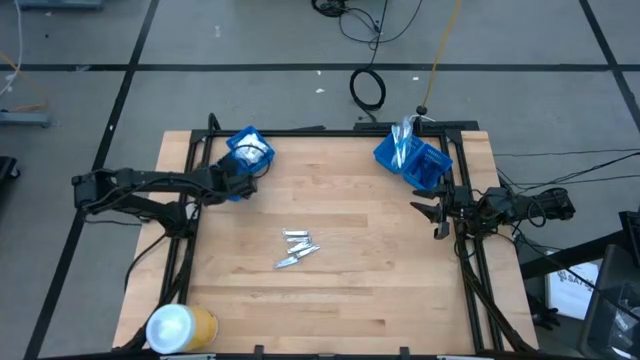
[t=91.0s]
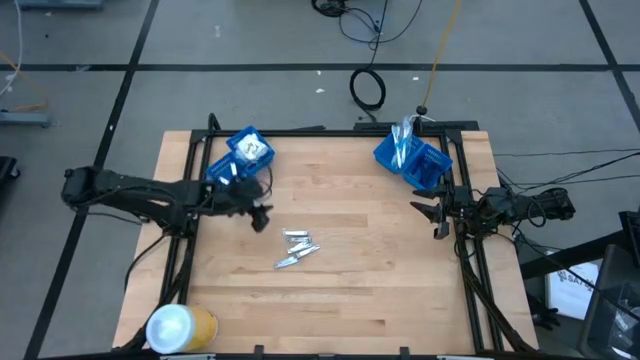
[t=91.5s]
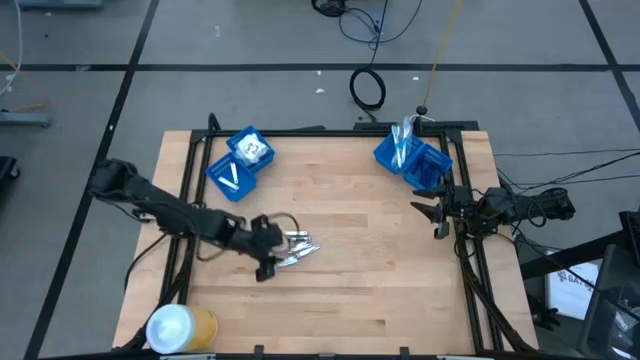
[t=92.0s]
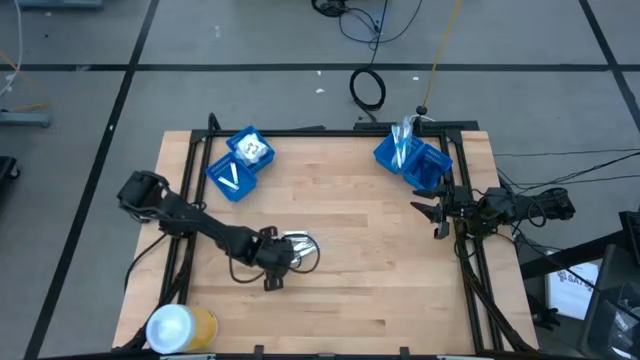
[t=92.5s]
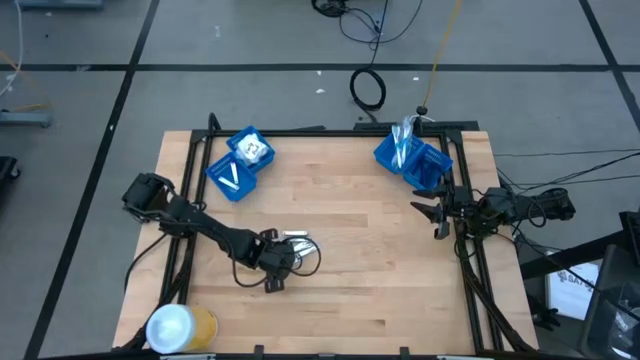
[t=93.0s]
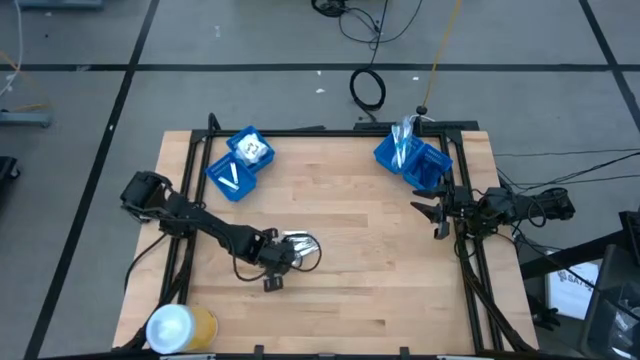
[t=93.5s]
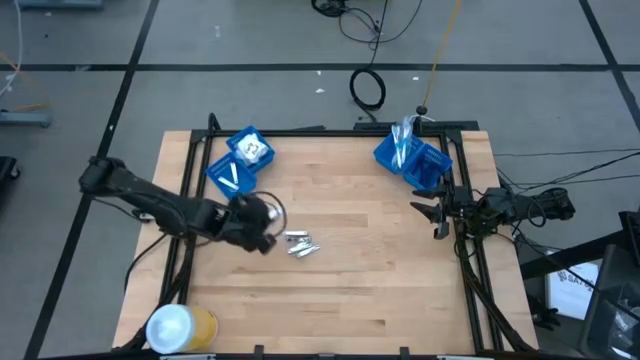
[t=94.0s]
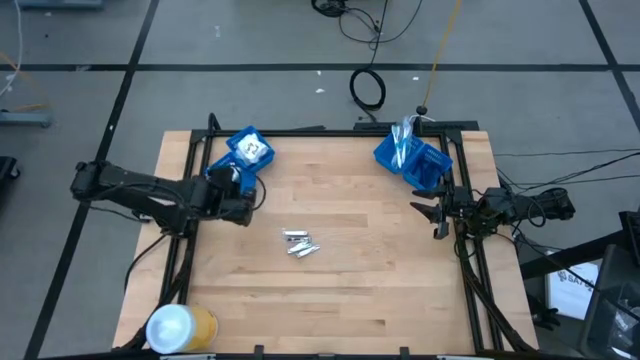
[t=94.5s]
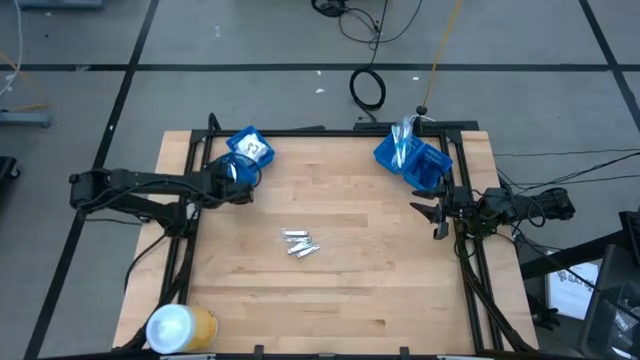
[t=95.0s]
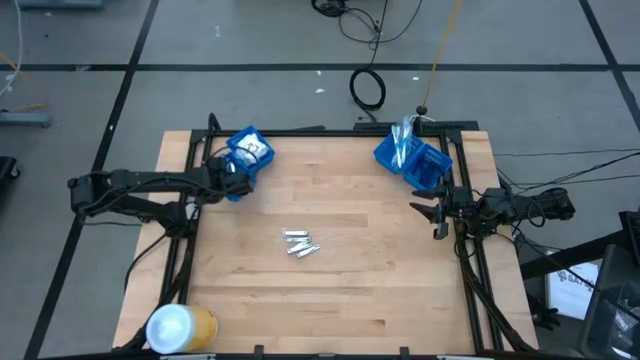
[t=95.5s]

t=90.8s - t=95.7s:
Task: Pick & Place Travel size toiletries
Put the silver nail cutter into the left blue basket

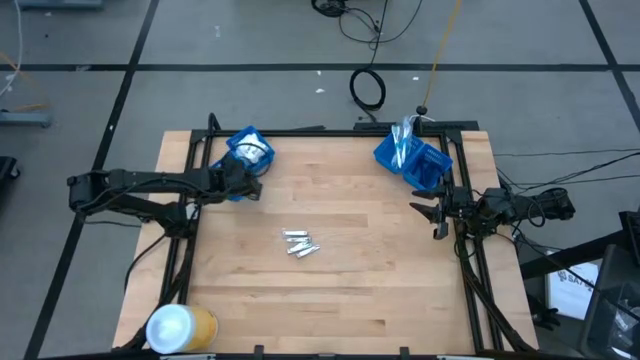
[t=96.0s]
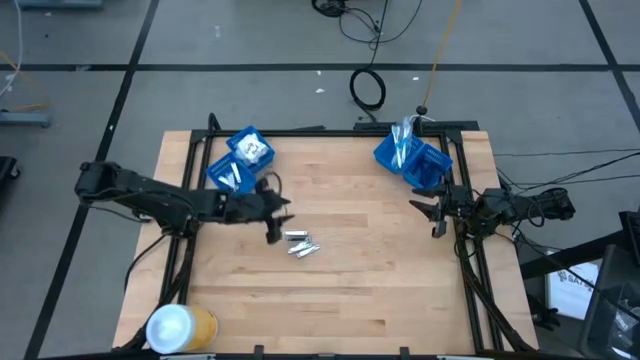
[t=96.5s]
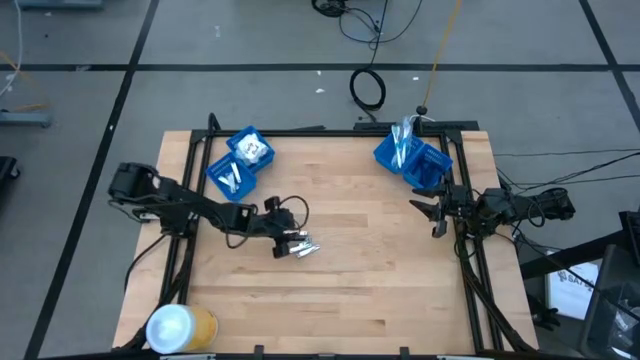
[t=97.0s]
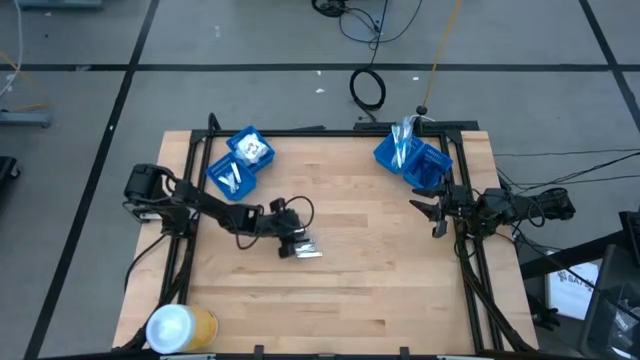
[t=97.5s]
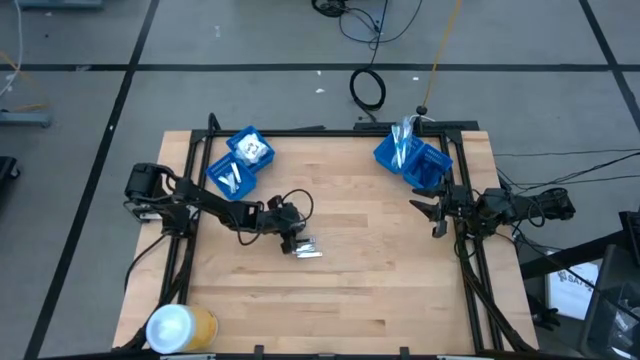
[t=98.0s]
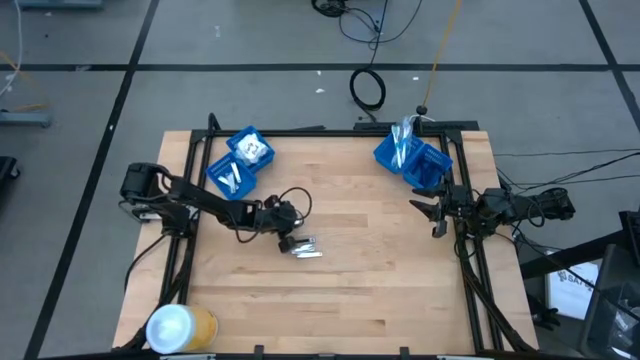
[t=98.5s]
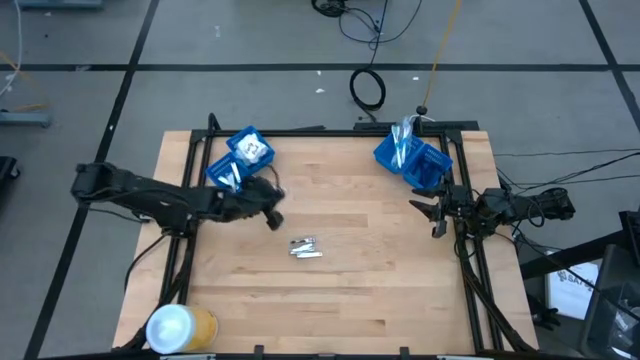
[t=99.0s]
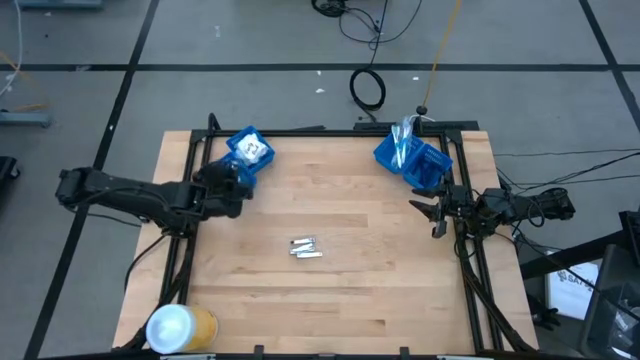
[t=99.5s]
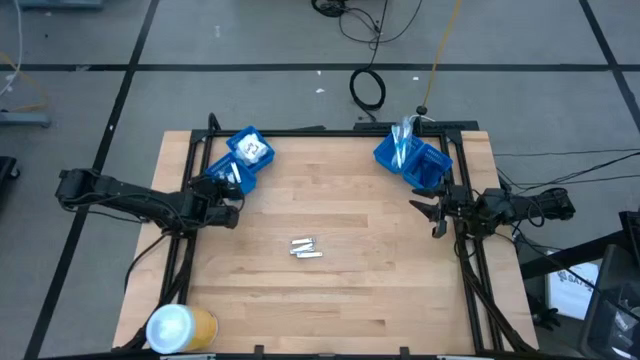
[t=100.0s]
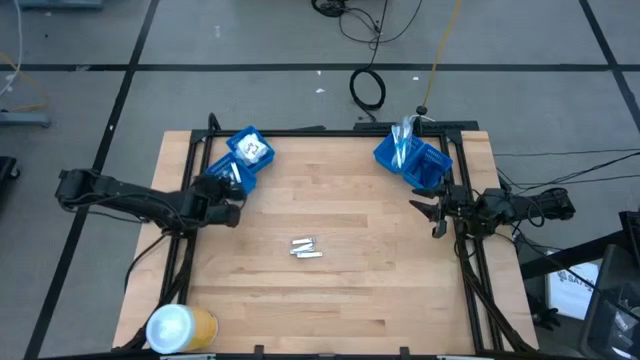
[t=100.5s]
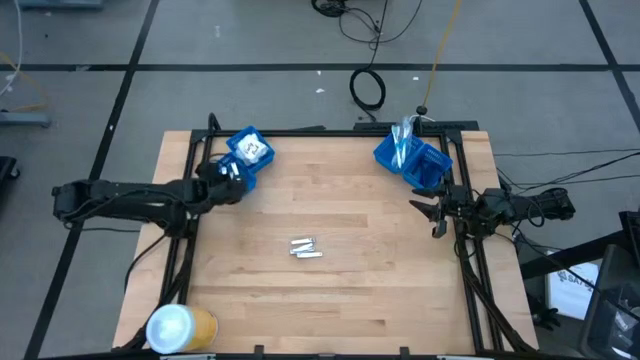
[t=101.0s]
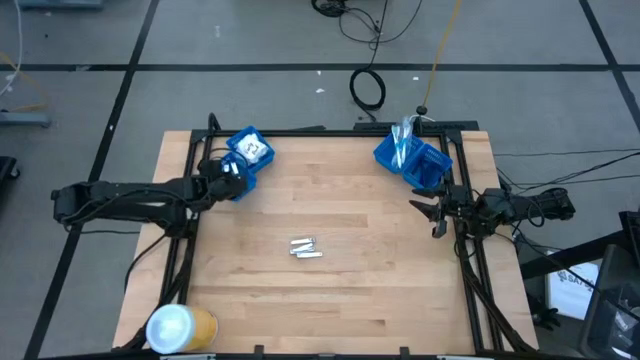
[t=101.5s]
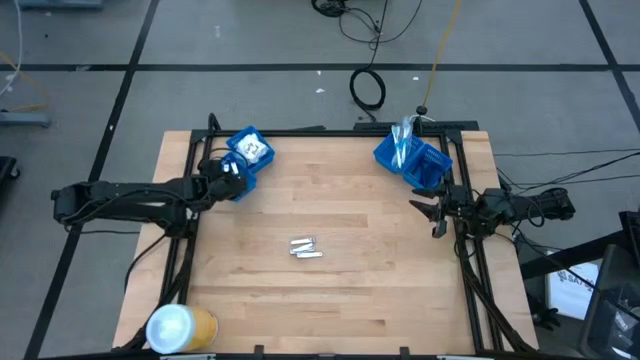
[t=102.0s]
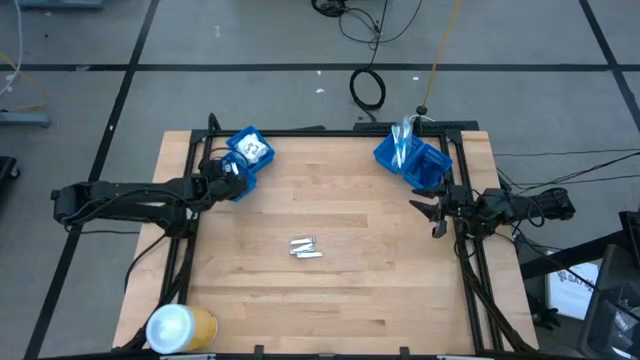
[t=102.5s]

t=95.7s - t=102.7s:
Put the silver nail cutter into the left blue basket

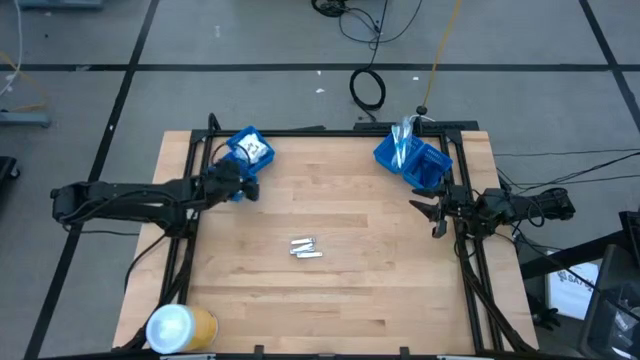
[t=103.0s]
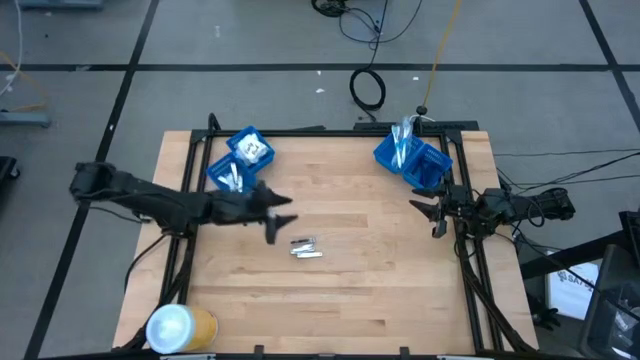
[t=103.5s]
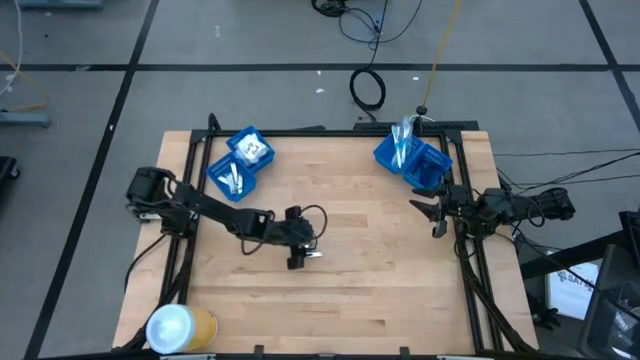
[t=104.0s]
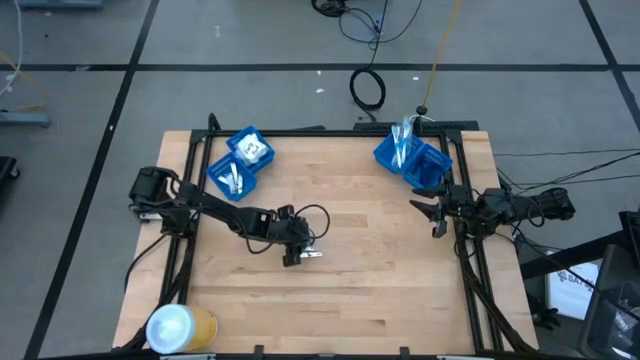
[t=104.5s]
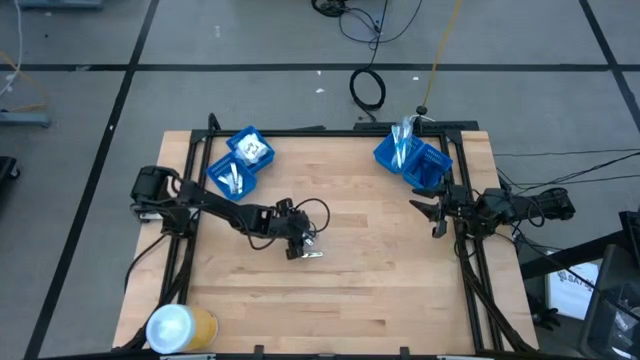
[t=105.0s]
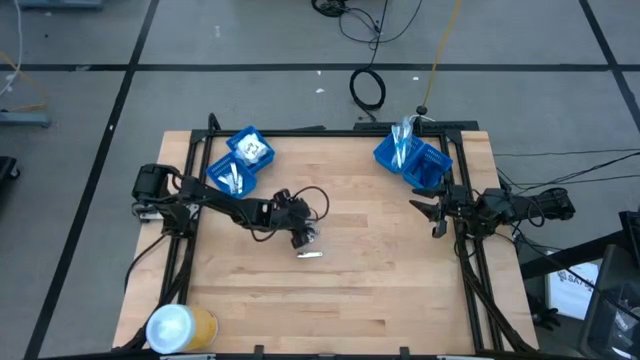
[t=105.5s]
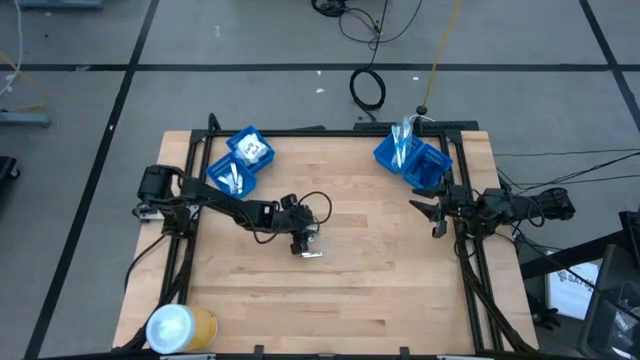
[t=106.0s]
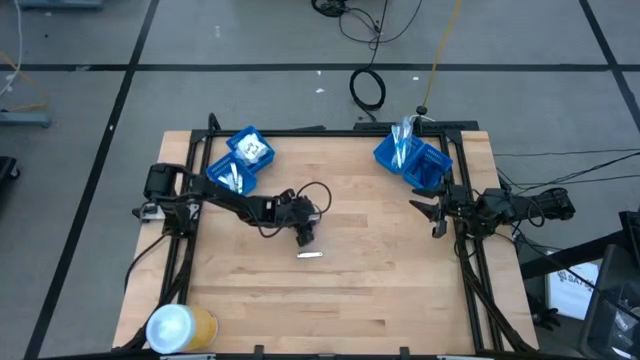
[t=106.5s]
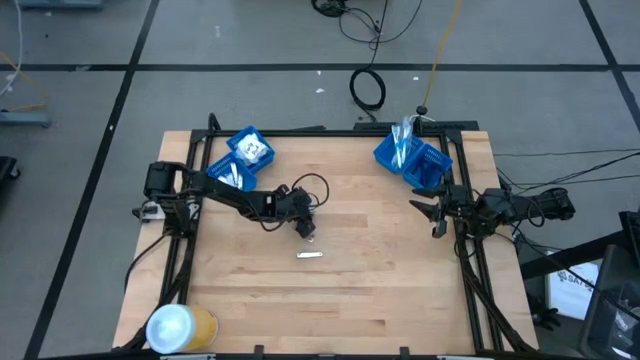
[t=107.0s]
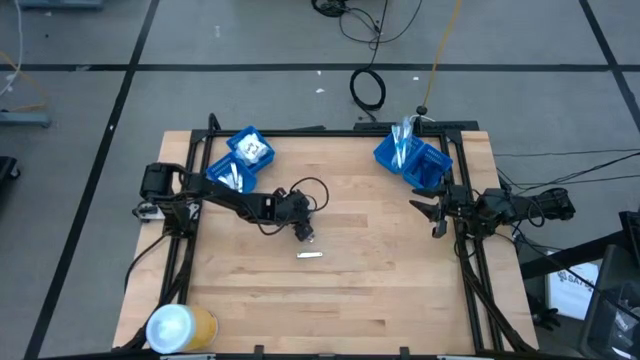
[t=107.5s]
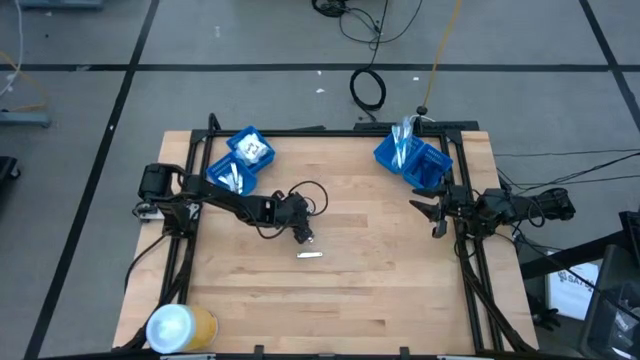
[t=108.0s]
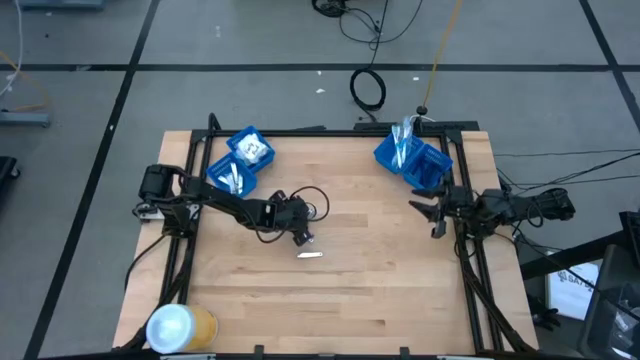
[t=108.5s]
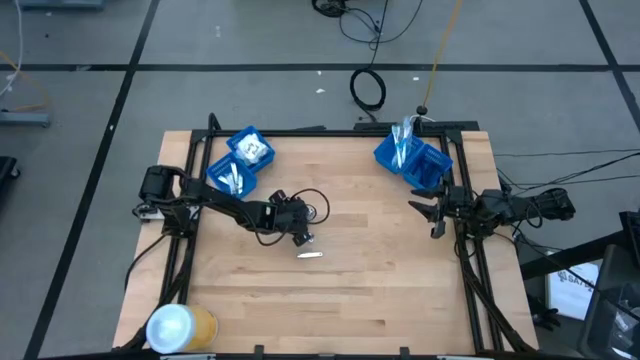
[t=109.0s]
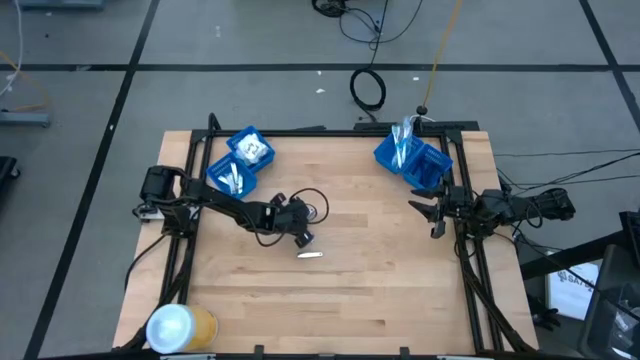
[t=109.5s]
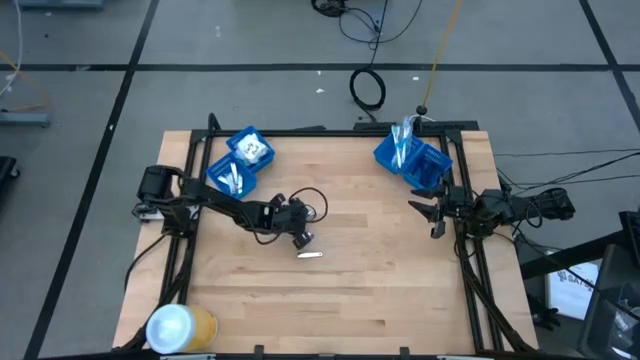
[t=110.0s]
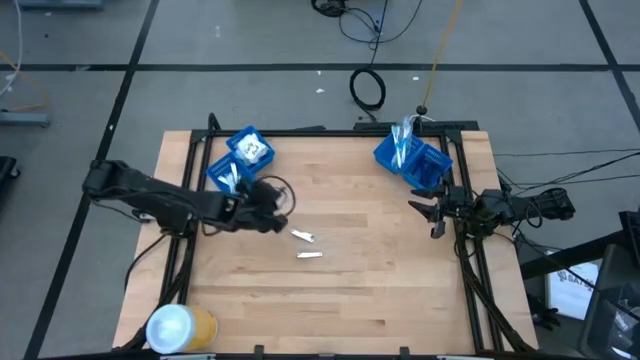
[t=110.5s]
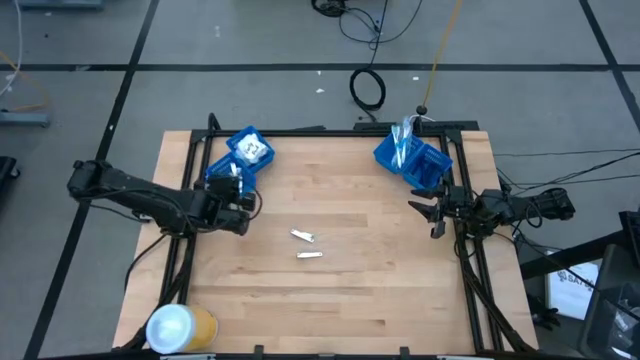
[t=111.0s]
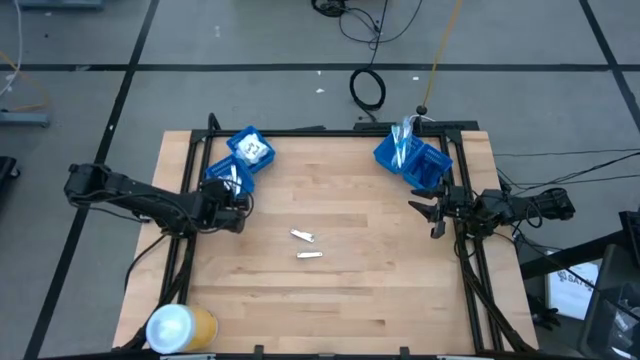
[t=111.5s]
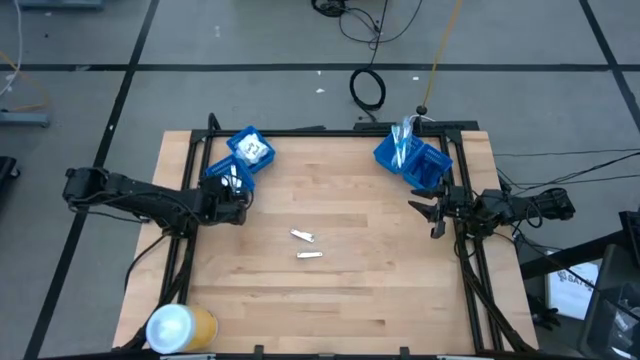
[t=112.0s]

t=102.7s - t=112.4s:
Put the silver nail cutter into the left blue basket
